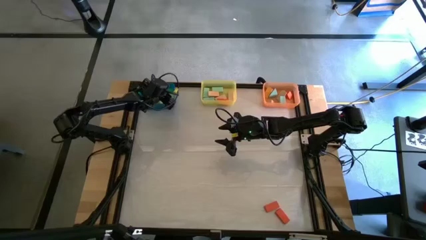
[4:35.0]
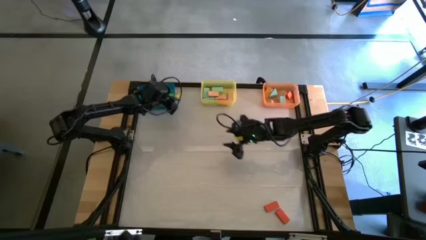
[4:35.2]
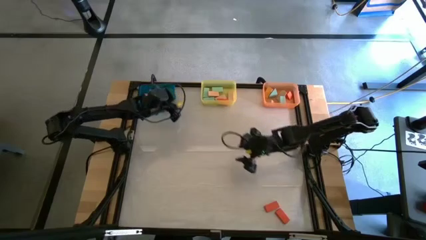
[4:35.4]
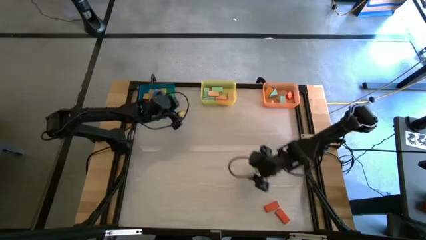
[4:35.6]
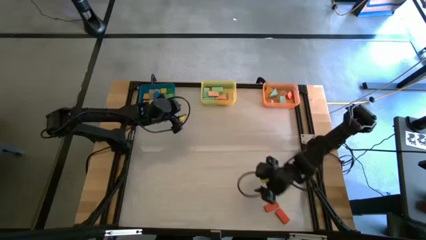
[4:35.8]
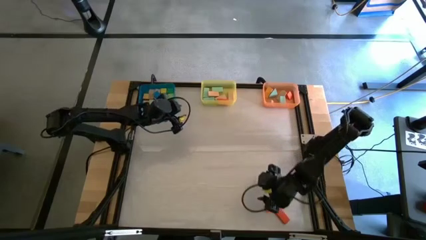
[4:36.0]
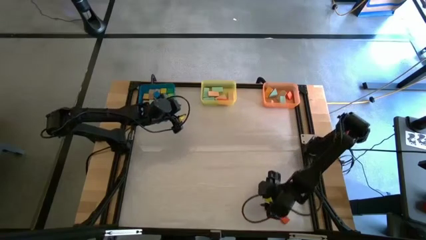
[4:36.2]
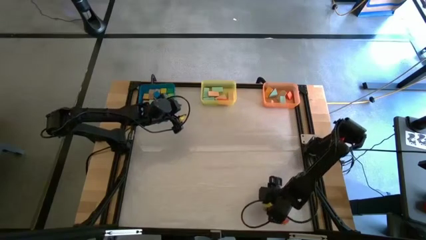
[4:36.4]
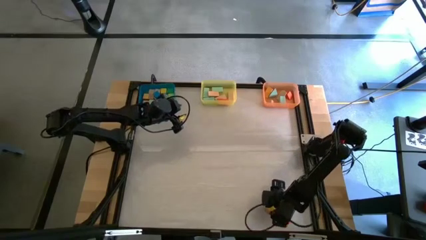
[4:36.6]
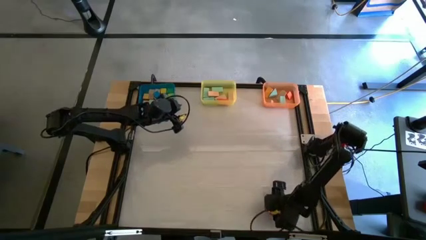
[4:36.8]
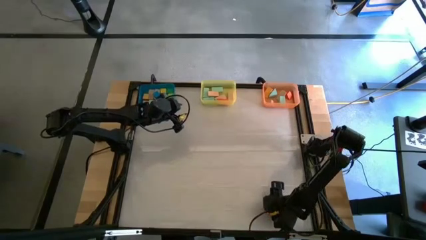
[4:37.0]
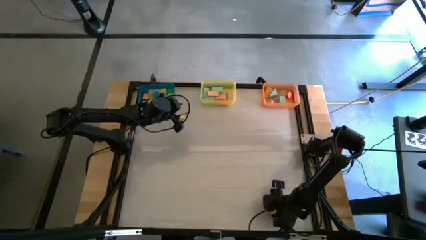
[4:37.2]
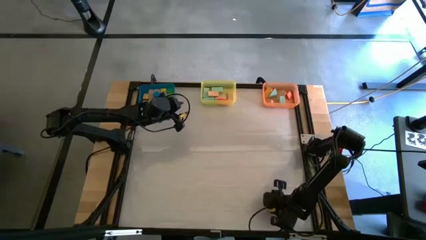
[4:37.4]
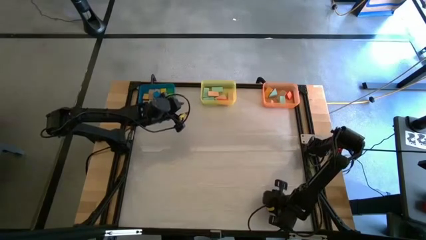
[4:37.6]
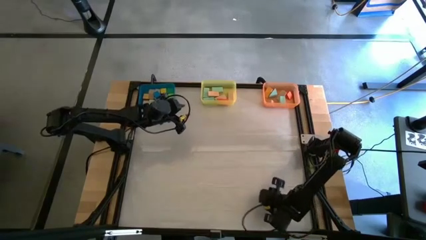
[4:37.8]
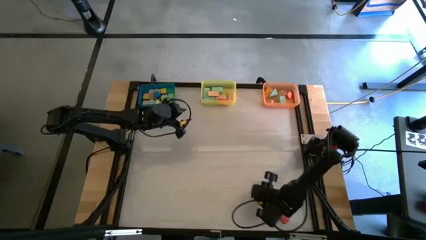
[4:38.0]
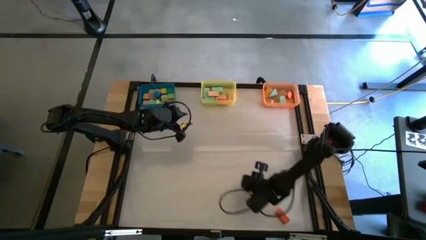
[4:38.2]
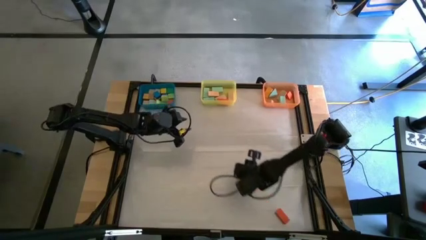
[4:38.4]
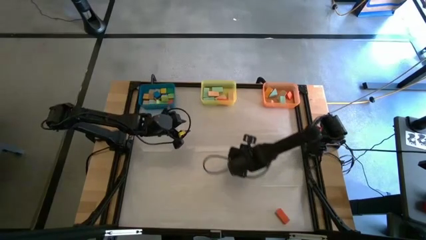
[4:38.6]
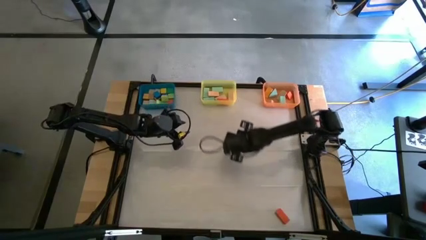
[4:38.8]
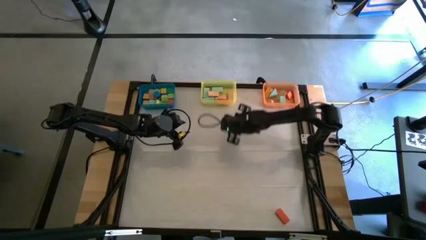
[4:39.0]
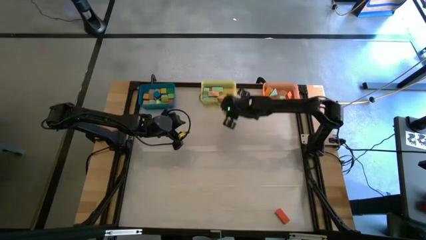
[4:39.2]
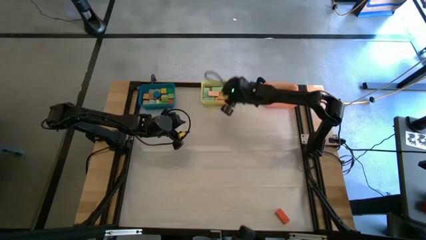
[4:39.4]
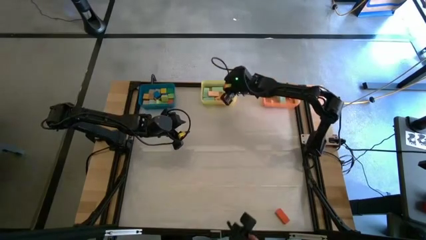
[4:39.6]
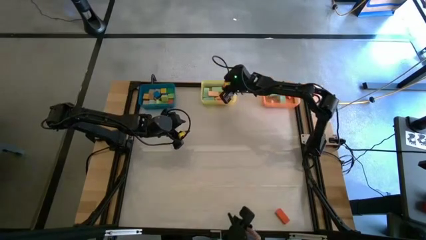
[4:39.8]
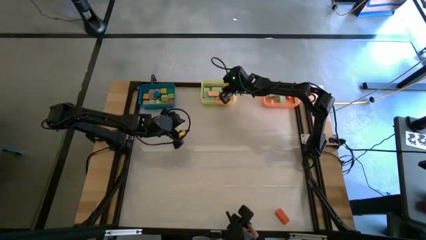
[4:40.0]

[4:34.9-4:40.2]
Task: Sort blocks by size
Put the orange rectangle block into the yellow bin

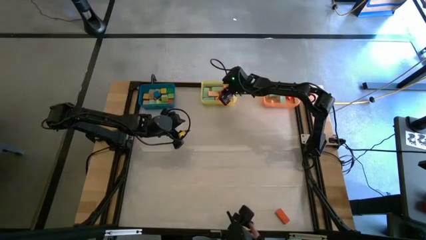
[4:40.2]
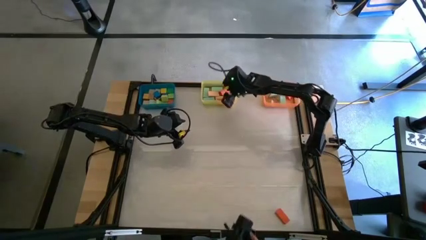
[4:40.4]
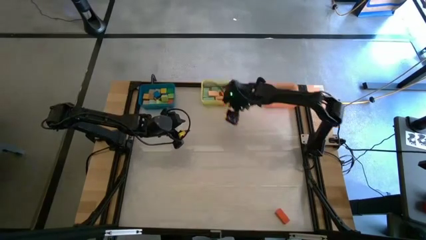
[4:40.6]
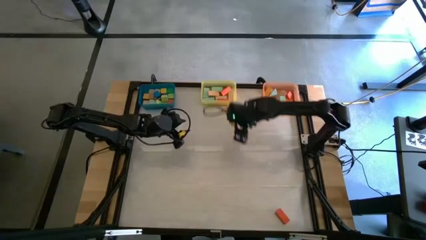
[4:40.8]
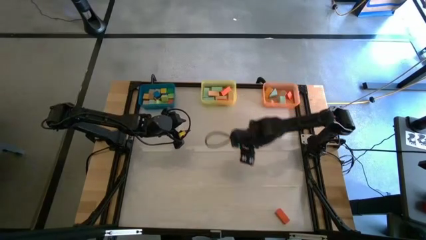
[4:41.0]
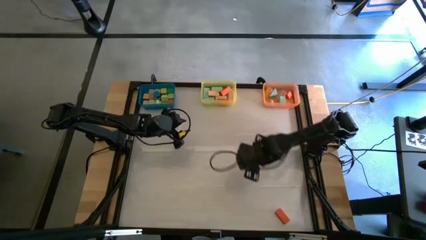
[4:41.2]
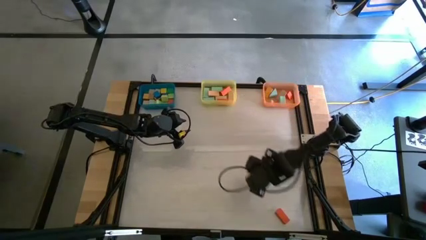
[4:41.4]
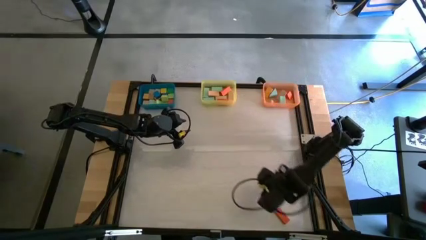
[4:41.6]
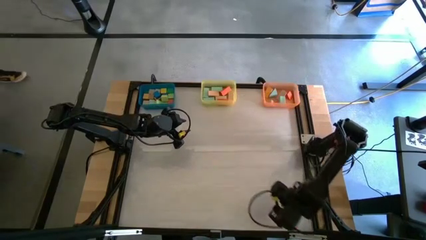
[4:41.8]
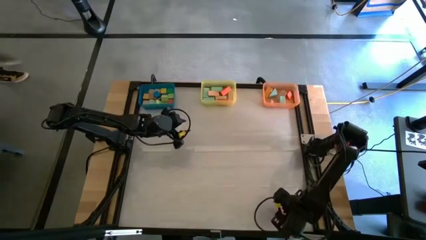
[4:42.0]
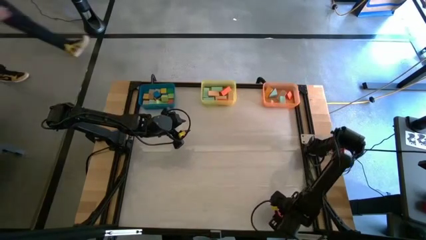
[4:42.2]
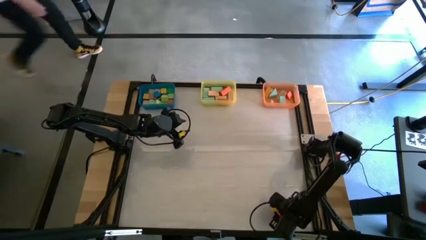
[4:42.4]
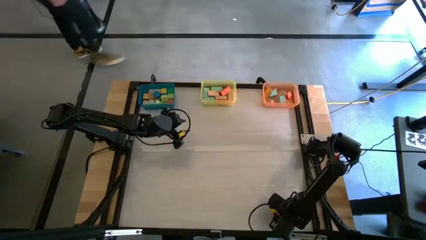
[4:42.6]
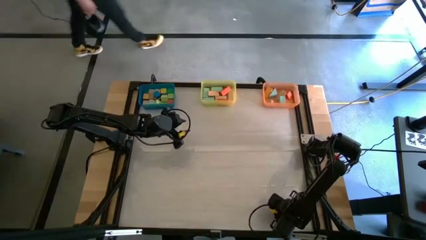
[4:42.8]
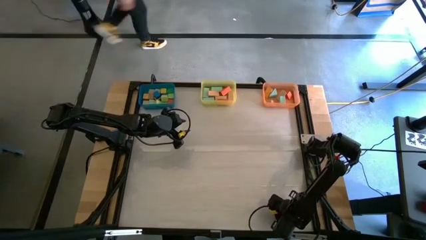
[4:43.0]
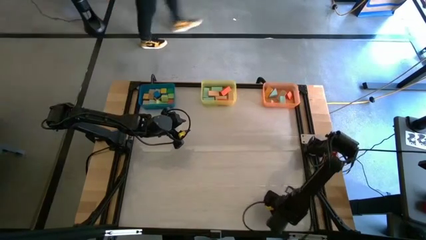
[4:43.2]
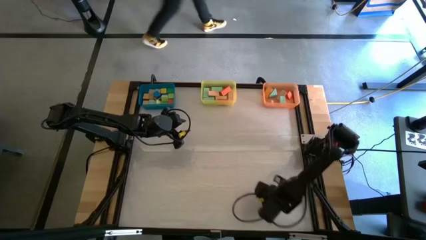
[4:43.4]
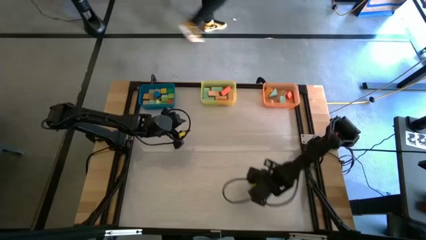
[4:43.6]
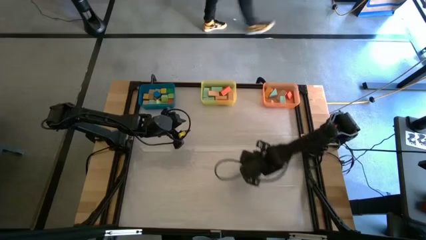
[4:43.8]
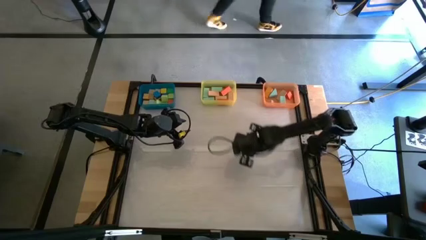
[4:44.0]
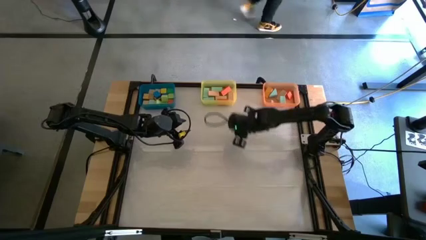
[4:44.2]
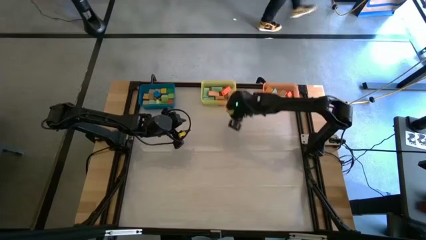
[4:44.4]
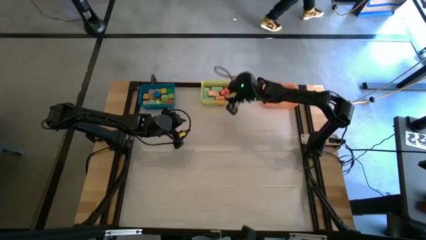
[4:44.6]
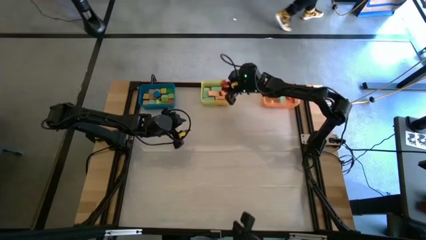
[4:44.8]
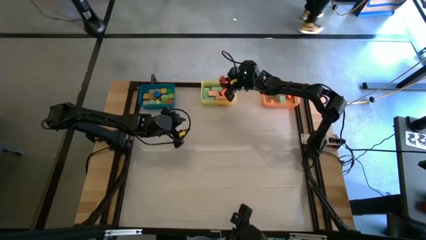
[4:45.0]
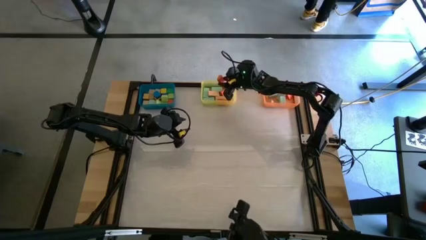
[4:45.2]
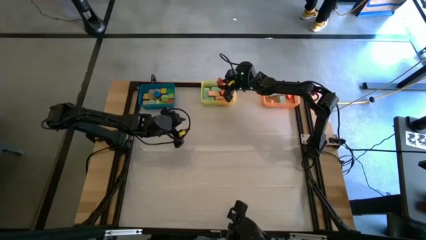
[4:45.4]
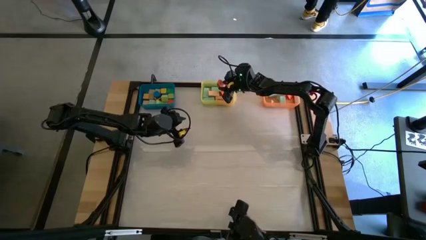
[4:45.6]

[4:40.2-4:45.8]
Put the orange rectangle block into the yellow bin

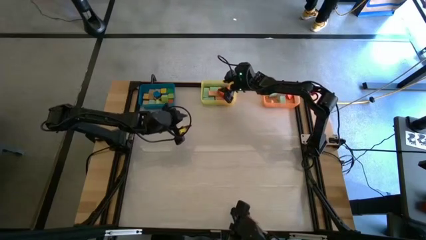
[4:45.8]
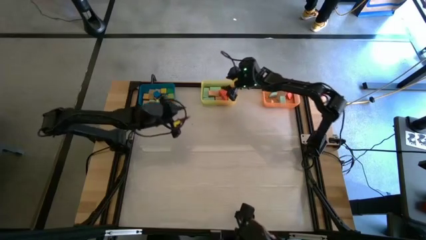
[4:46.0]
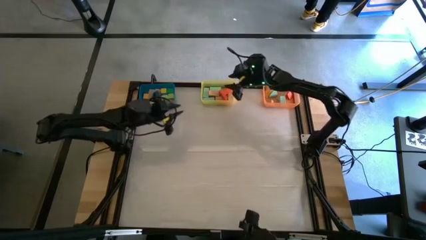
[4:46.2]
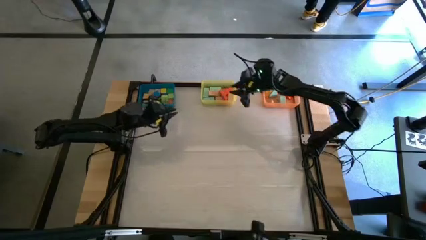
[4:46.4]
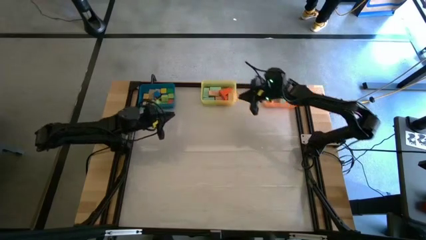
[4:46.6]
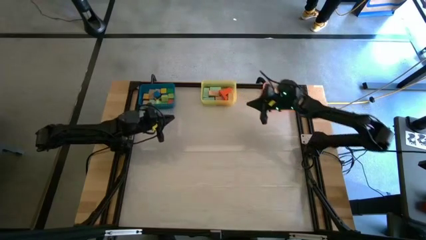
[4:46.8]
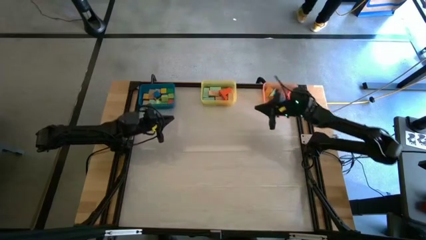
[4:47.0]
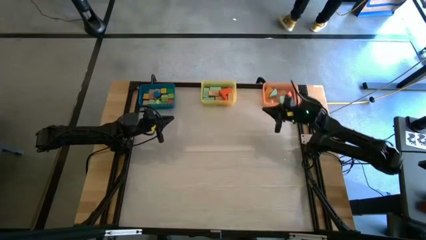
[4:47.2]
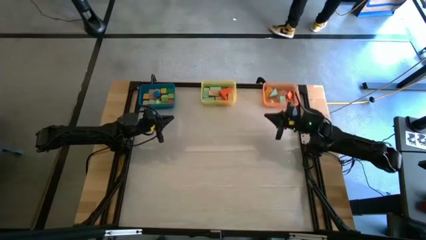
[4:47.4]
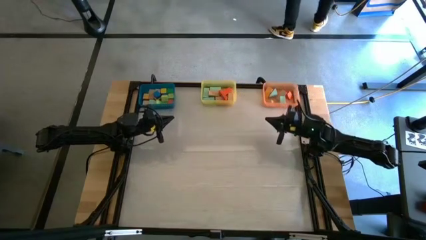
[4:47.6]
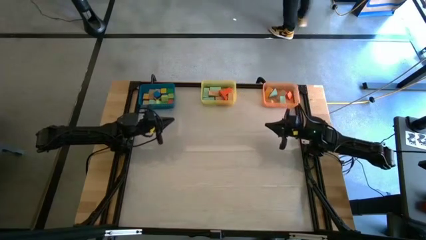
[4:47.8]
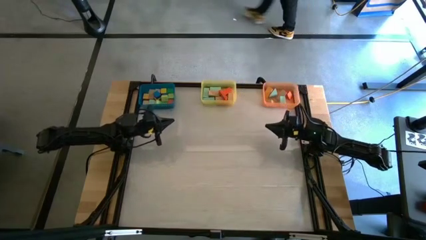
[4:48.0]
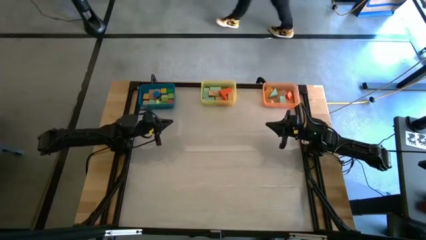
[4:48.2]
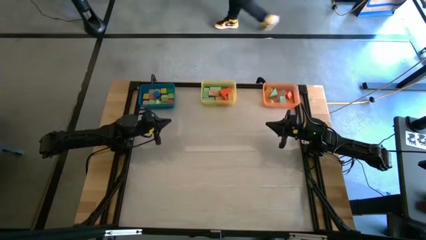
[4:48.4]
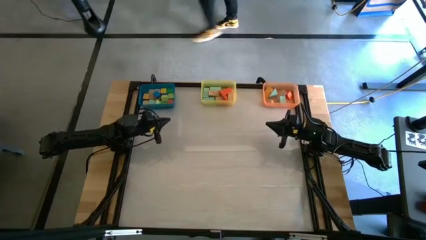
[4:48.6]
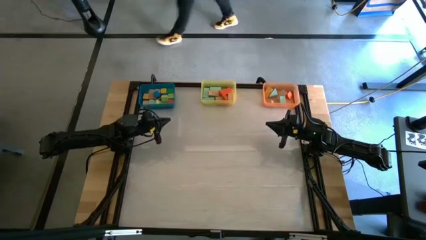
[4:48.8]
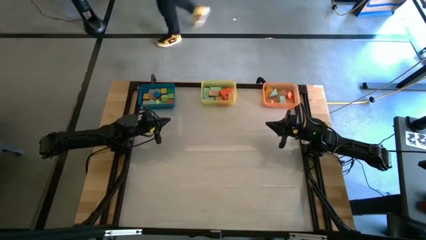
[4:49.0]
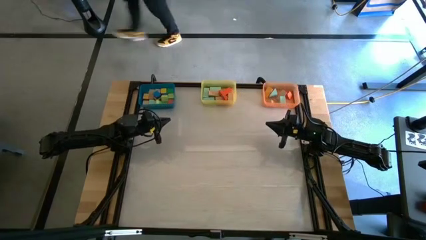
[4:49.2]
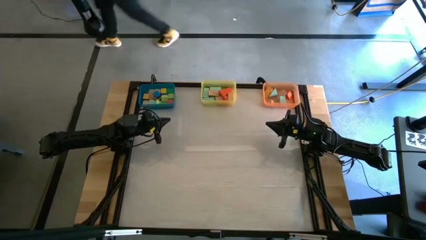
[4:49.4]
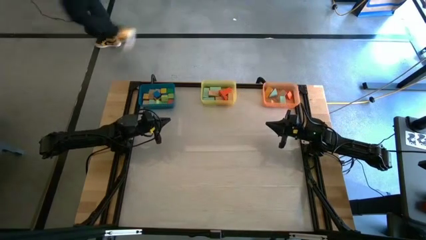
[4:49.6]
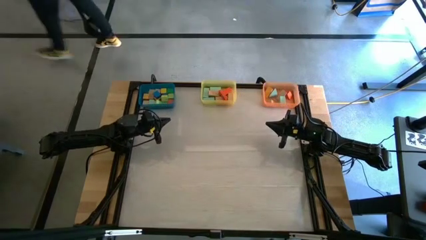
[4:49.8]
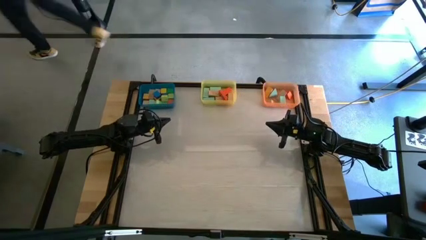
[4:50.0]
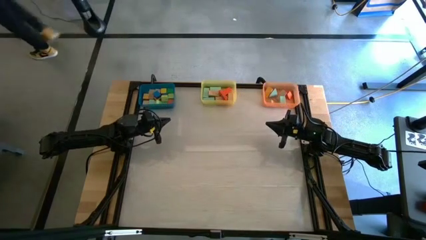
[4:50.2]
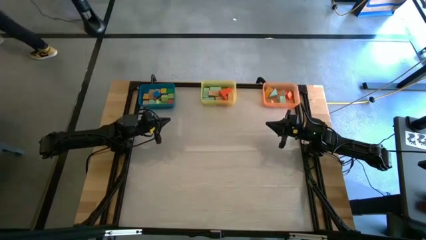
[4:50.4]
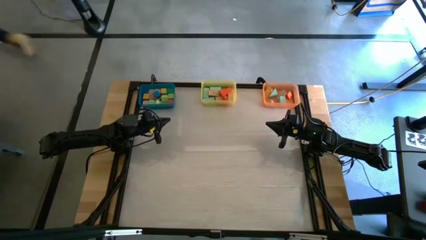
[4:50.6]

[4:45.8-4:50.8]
Return to Home Position

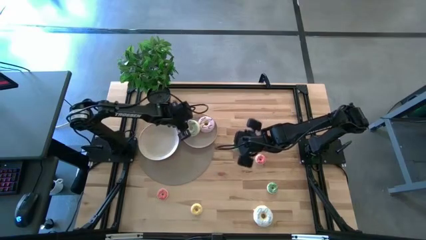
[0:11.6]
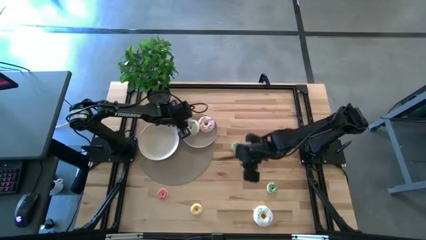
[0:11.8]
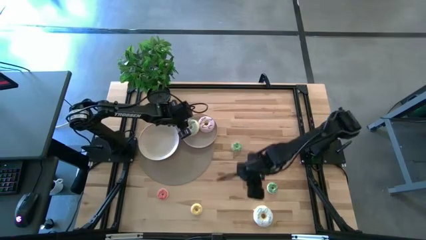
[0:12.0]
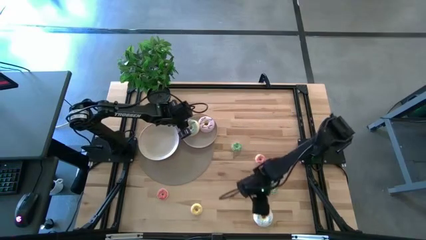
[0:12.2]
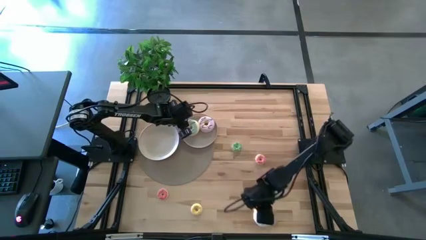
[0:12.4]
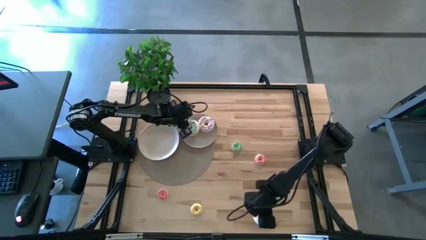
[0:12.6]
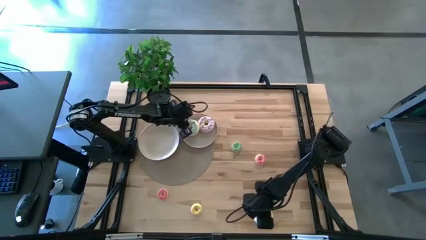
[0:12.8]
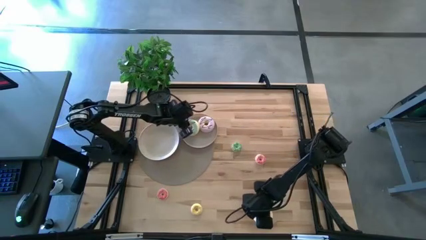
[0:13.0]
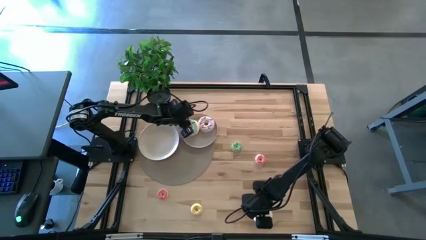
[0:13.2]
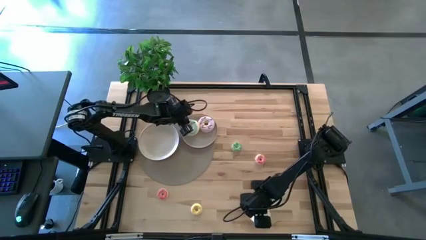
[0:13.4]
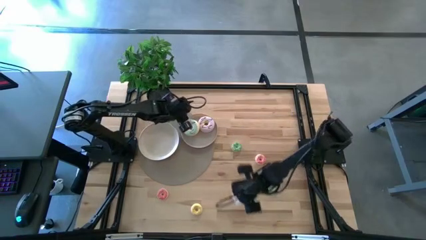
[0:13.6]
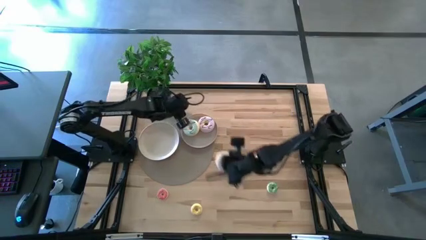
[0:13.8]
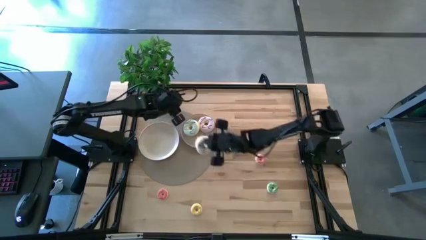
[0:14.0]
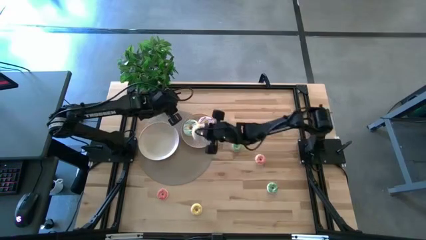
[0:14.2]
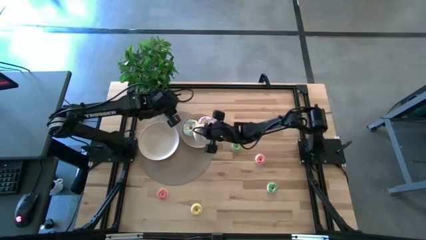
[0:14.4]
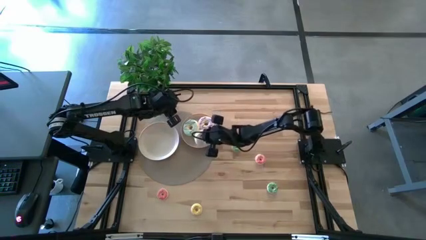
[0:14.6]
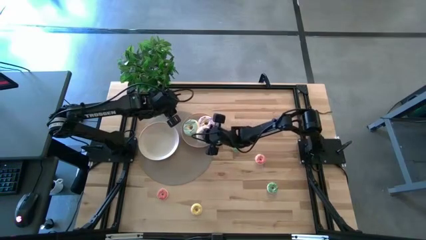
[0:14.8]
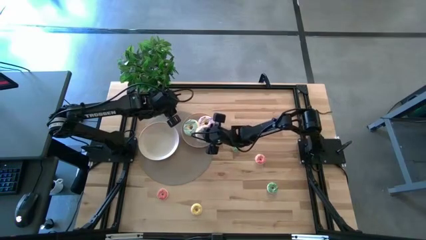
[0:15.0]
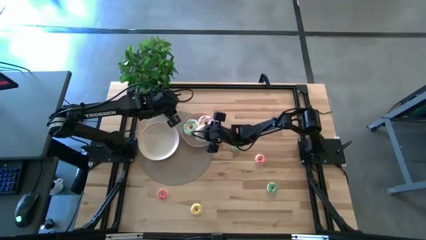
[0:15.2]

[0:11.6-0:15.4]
Task: Pick & Place donuts
Put the large white donut on the light brown plate
